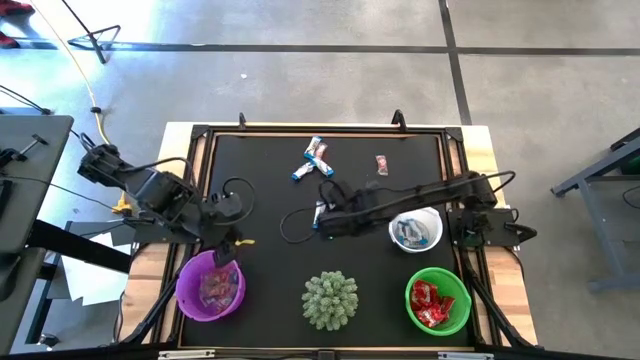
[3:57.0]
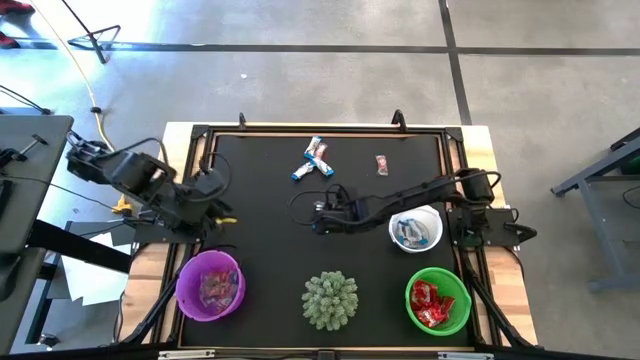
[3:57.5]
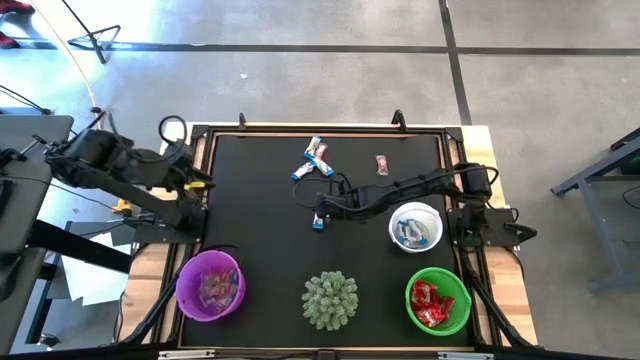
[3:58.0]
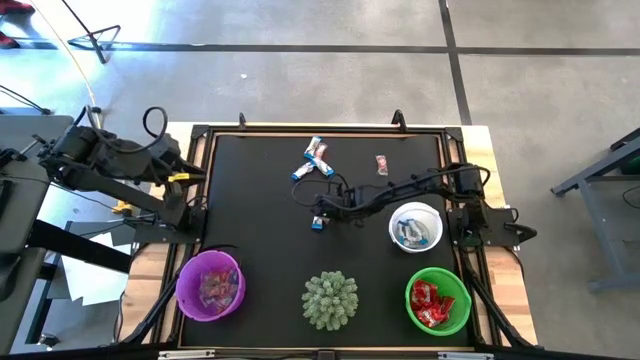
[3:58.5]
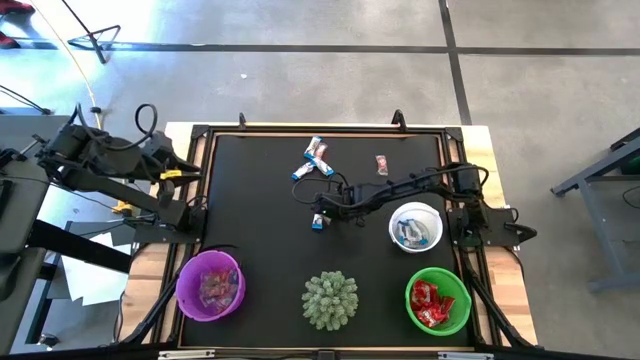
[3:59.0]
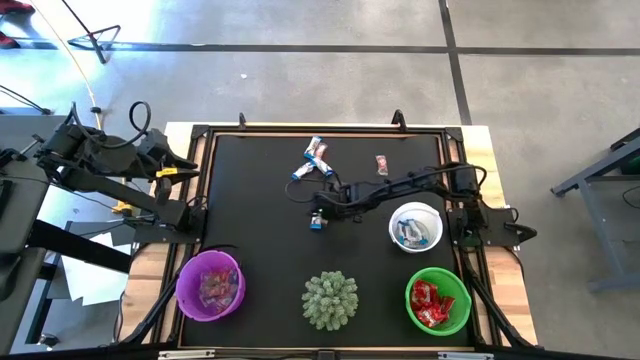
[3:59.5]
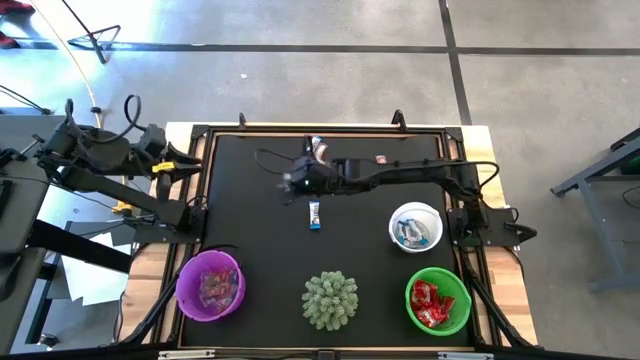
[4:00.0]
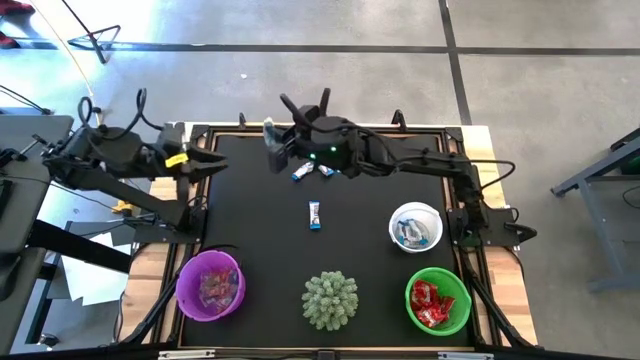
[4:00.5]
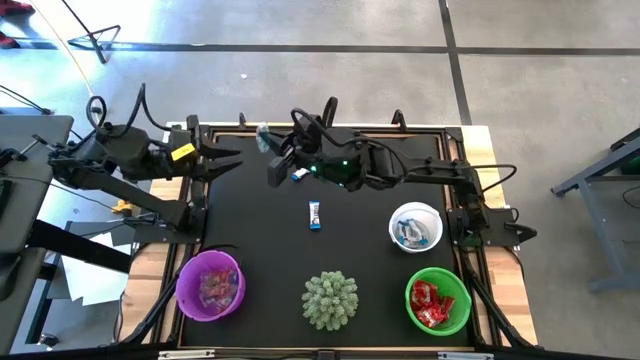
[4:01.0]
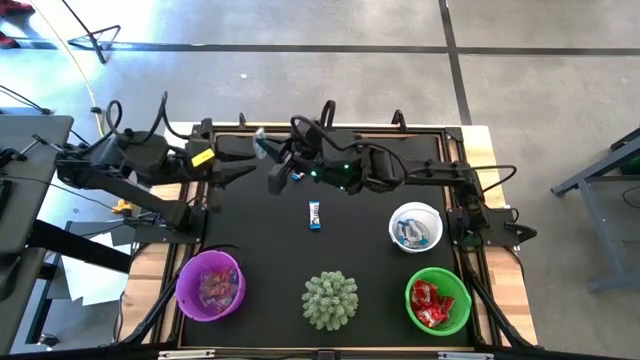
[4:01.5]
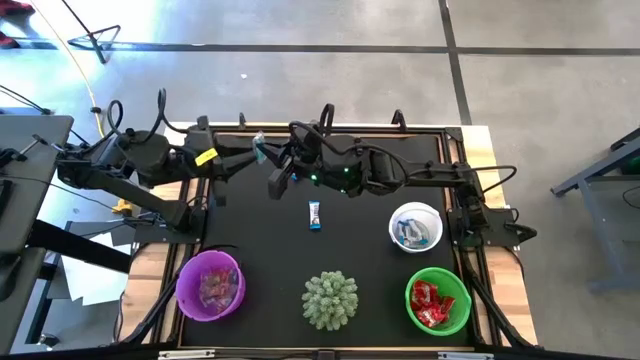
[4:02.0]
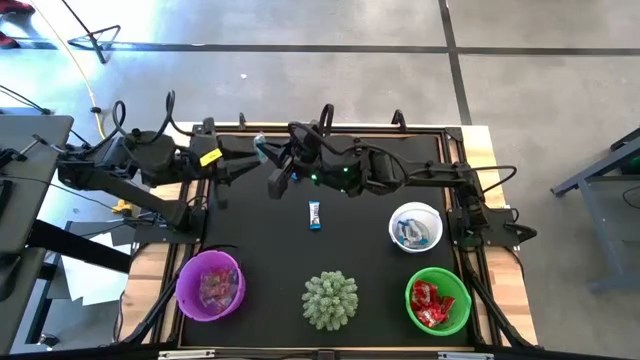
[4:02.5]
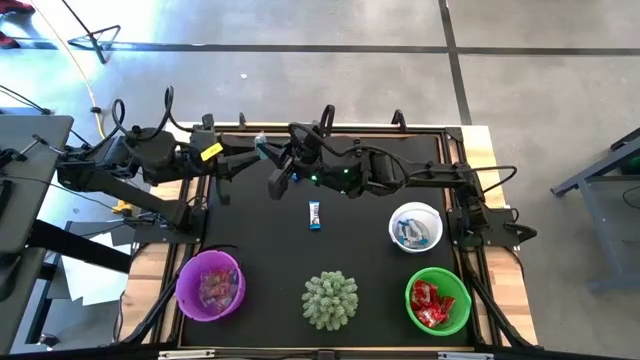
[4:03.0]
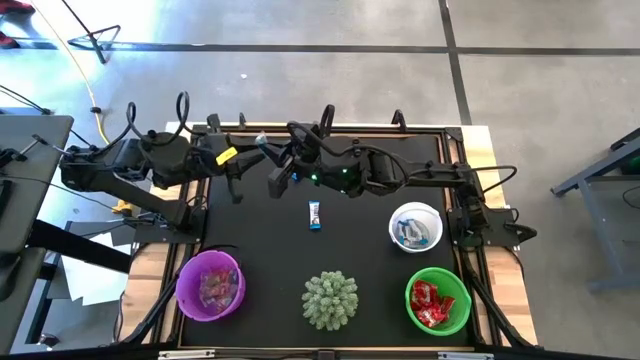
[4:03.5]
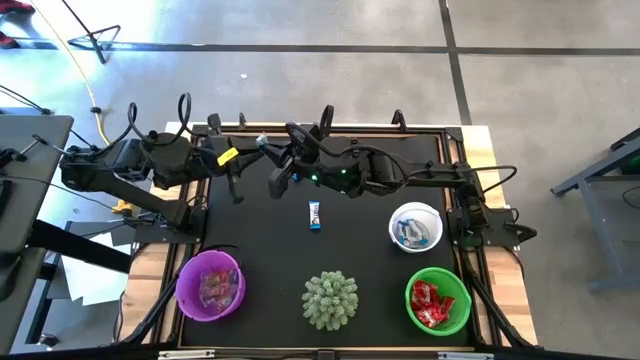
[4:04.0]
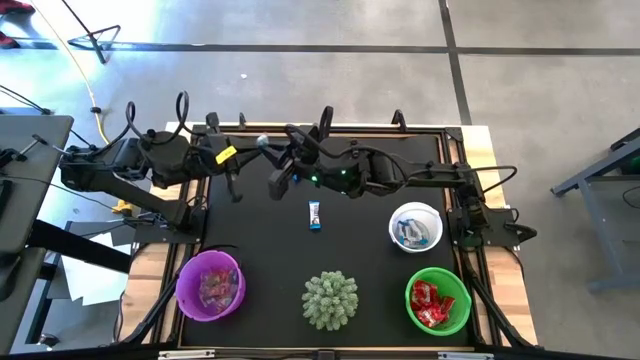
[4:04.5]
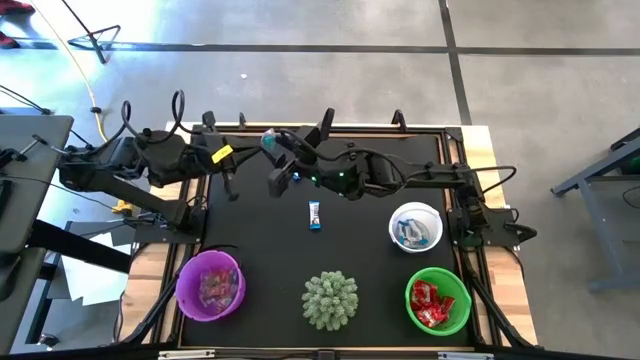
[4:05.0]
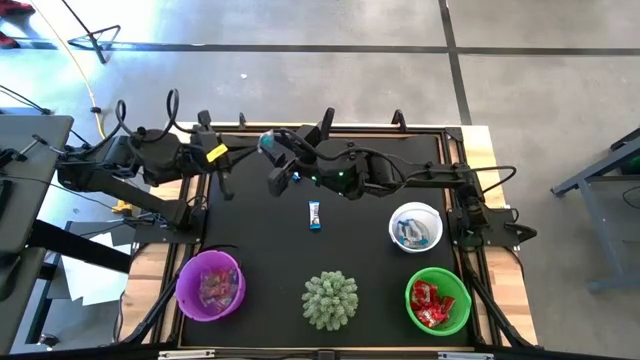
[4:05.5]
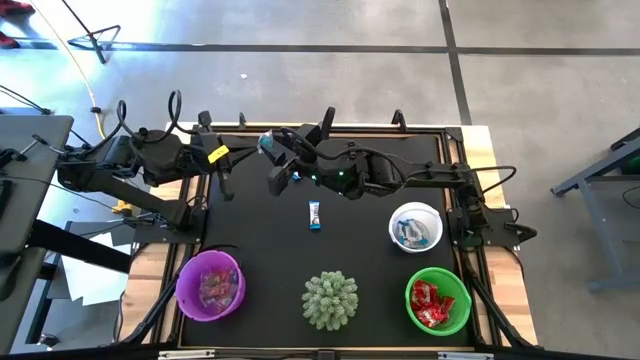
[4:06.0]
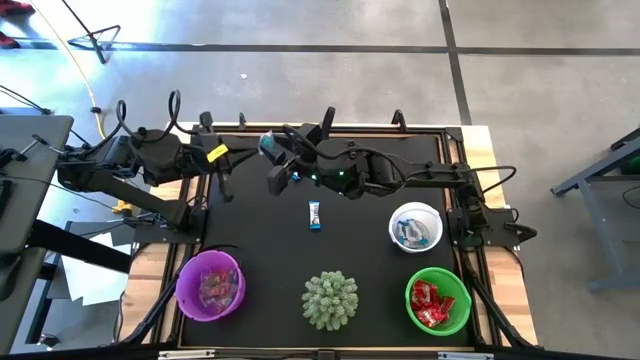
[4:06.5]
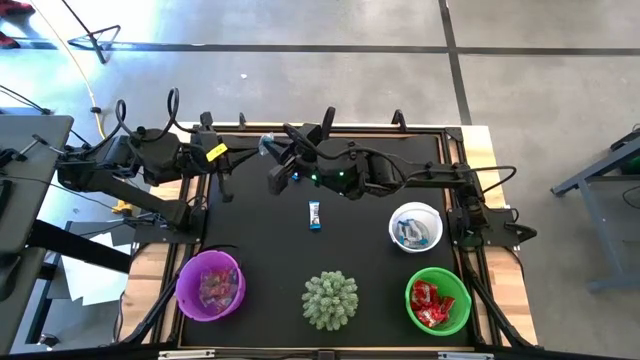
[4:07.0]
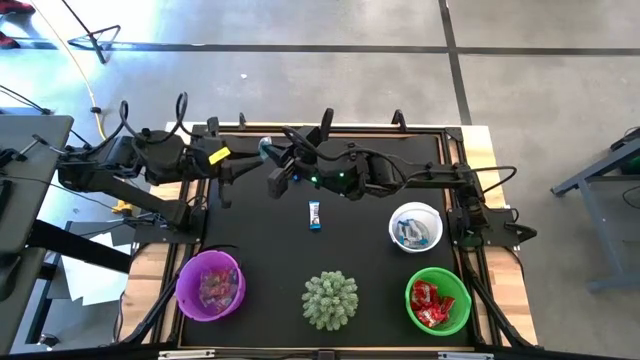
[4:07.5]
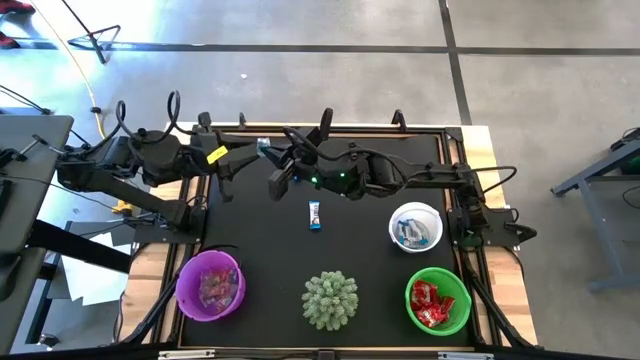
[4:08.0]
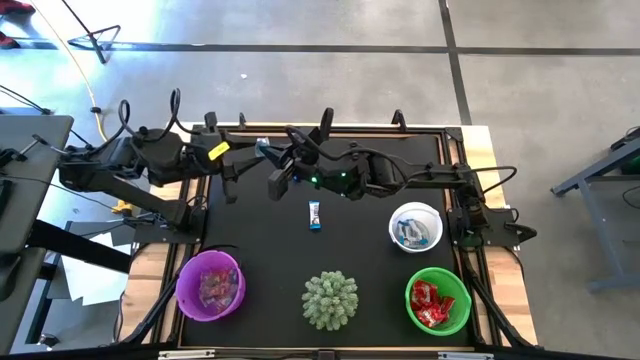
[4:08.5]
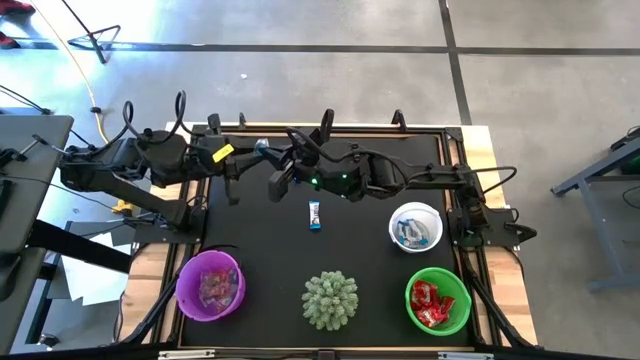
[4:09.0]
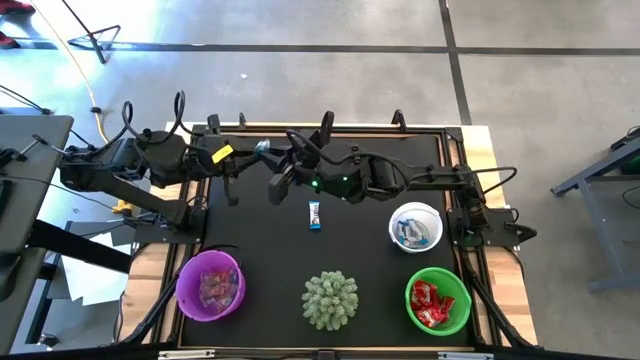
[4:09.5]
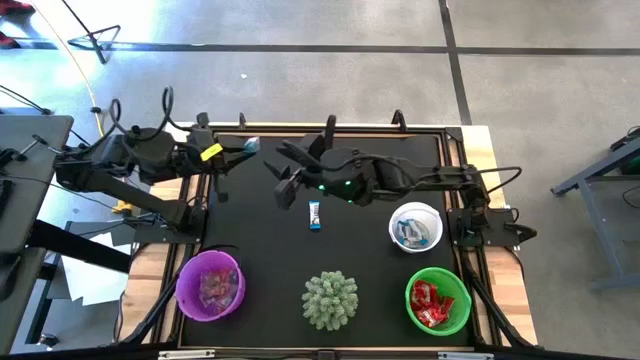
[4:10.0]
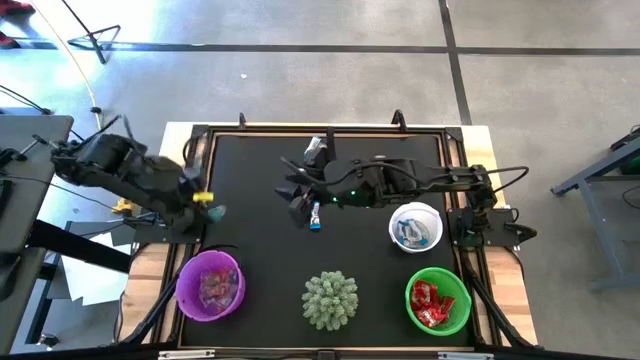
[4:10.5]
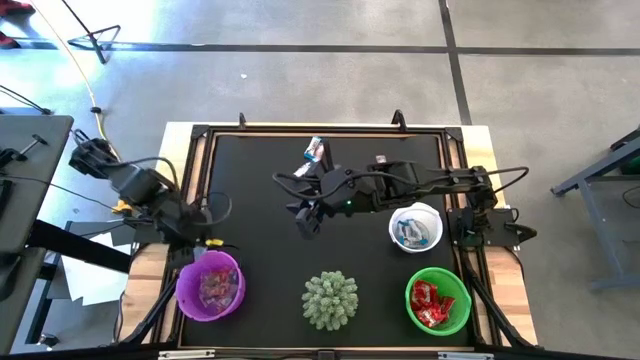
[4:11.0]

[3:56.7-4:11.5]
Task: Sort candy
Put the transparent candy wrapper into the purple bucket

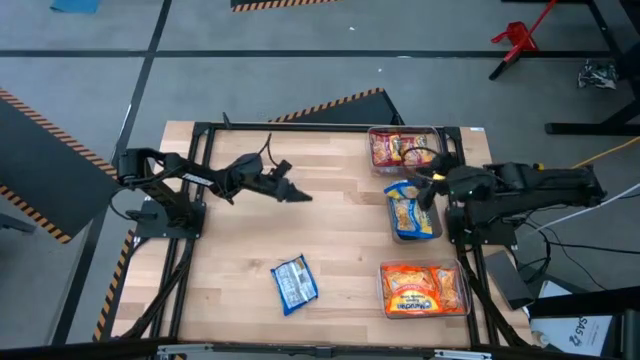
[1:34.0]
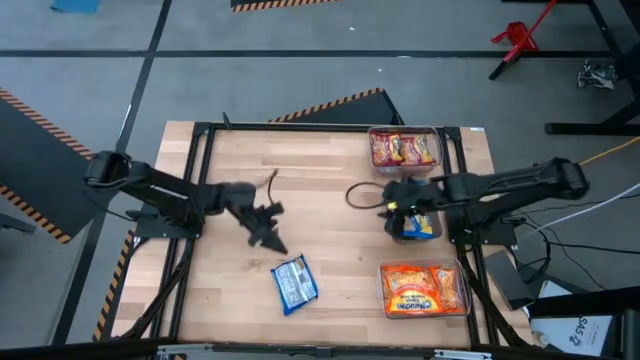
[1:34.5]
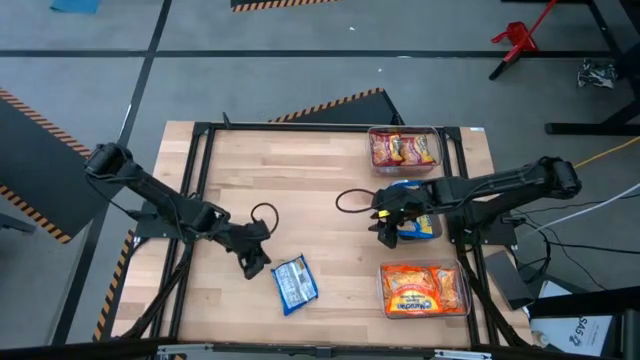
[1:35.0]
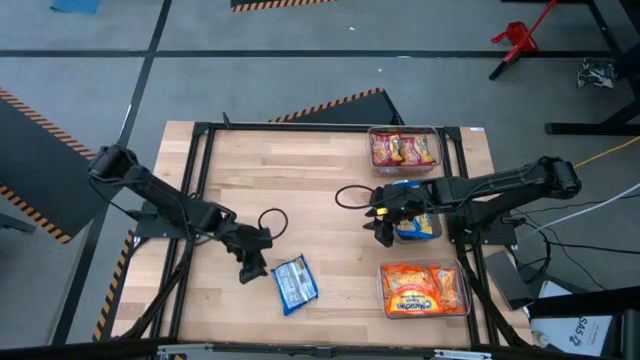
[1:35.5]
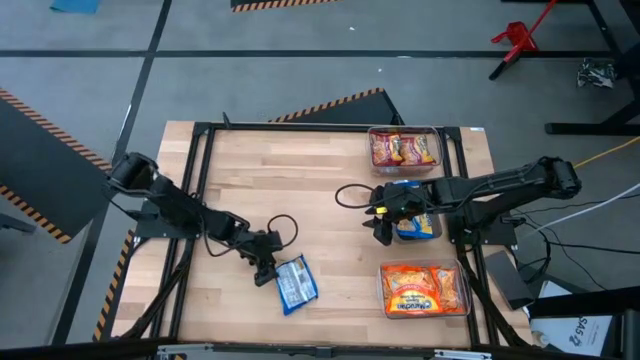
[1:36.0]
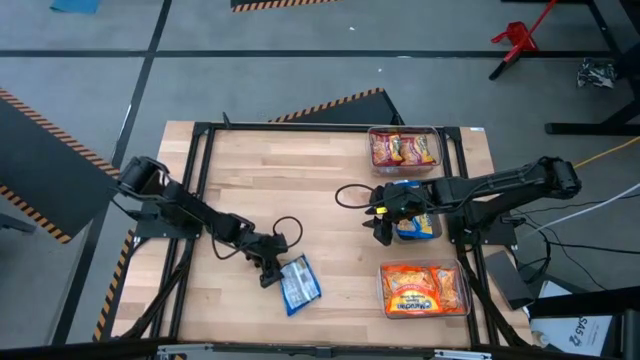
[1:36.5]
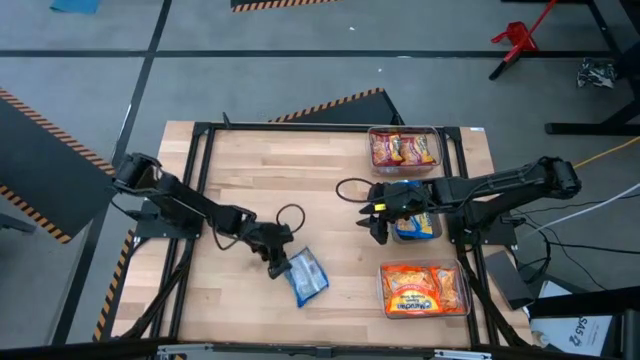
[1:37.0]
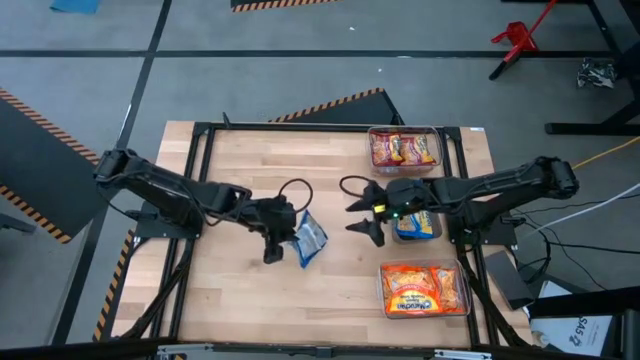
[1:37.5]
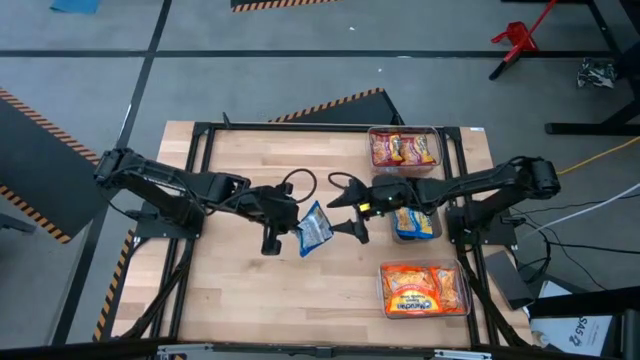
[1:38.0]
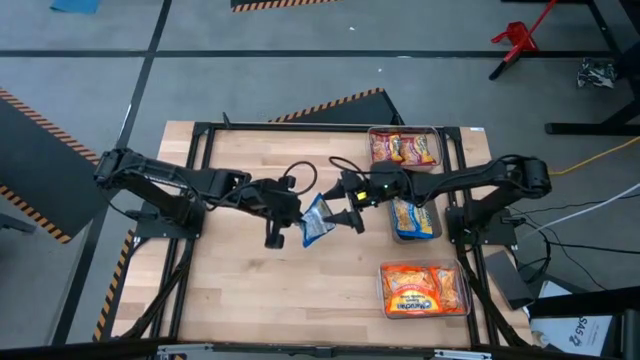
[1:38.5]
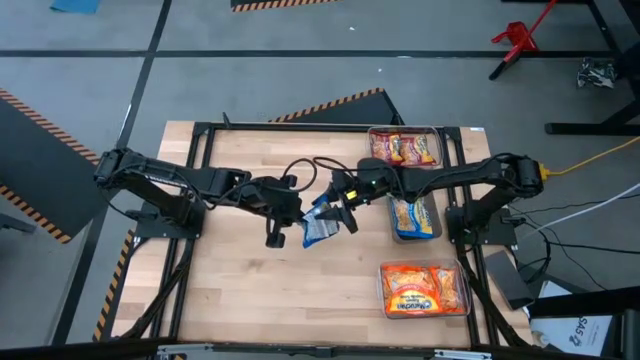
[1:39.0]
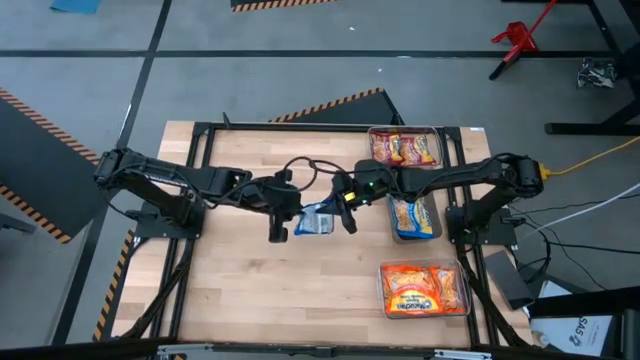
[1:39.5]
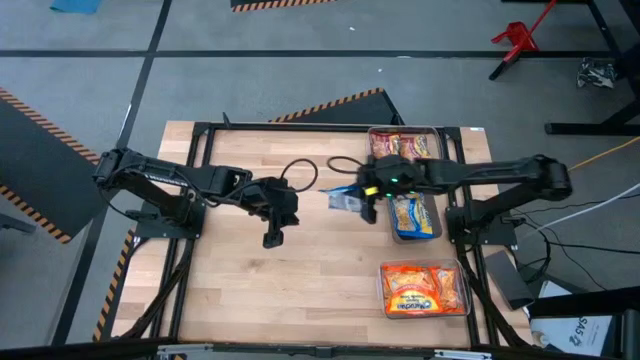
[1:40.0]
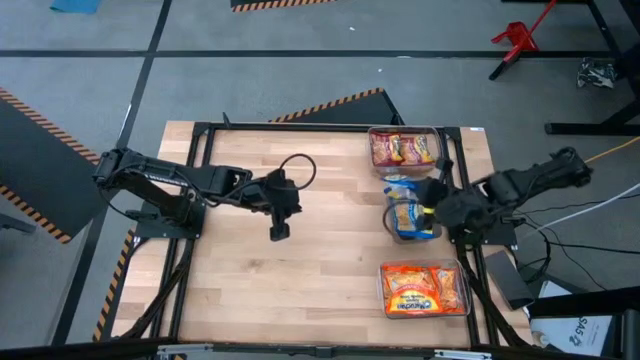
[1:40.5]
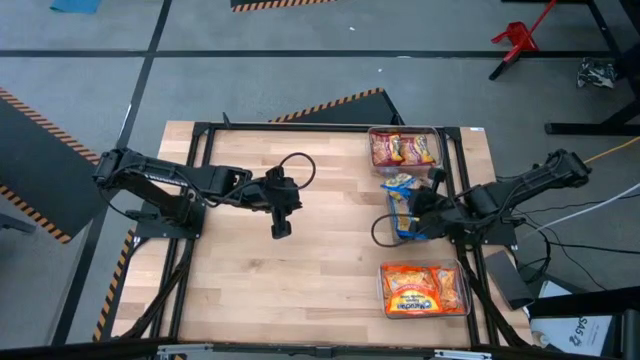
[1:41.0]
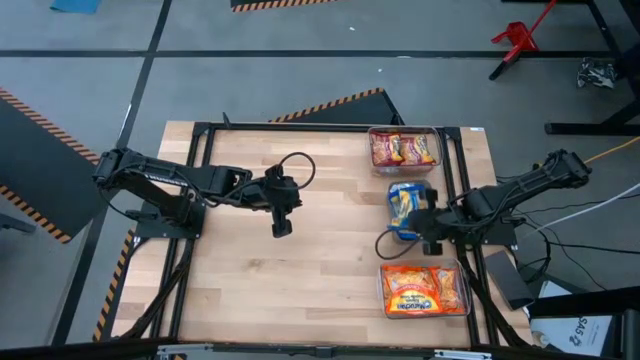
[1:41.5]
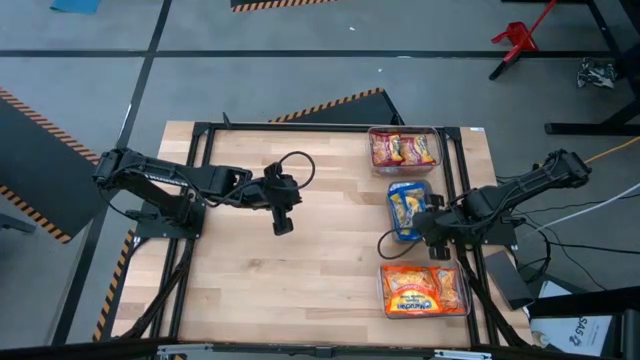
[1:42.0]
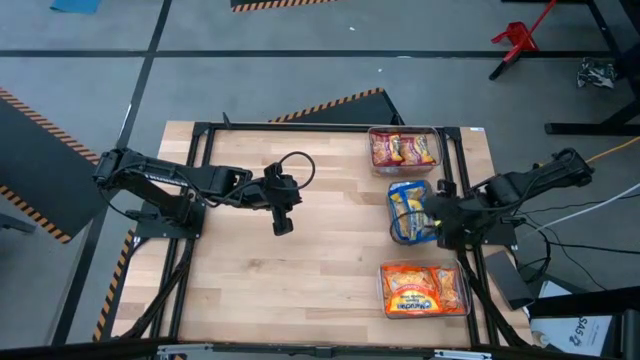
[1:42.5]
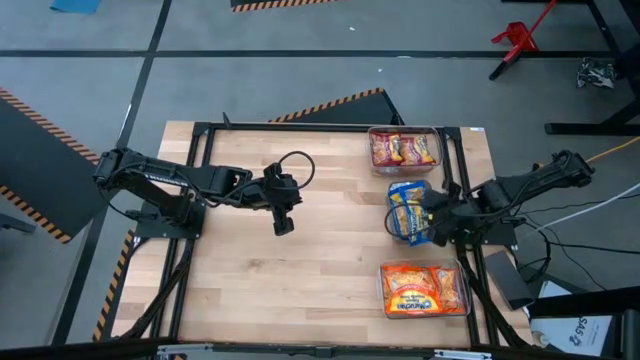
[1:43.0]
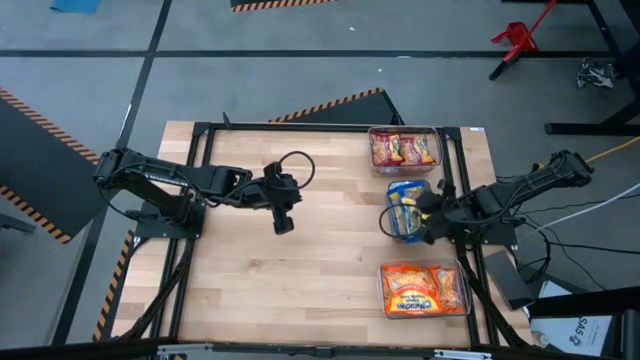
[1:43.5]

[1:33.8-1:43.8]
Task: Sort Maruchan noodles
Put the blue noodle packs into the black bin
